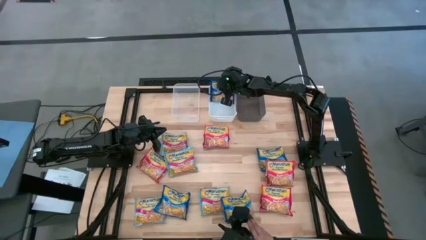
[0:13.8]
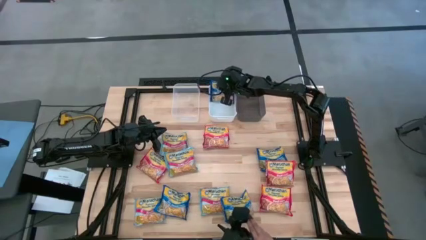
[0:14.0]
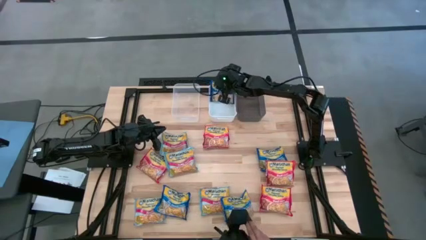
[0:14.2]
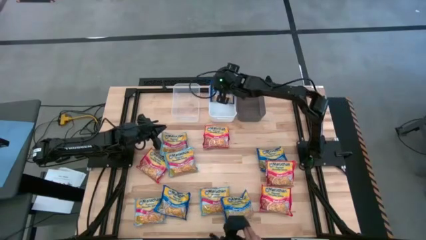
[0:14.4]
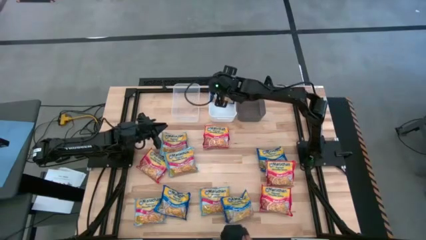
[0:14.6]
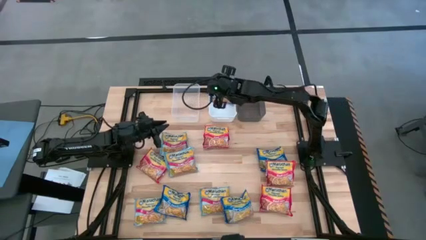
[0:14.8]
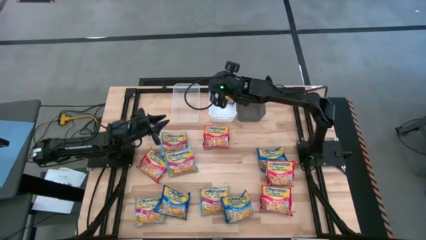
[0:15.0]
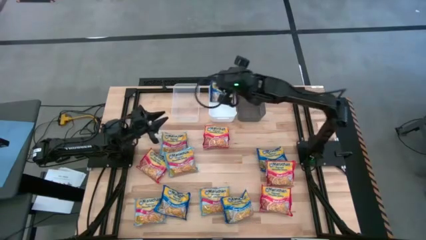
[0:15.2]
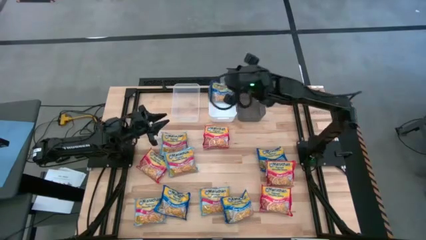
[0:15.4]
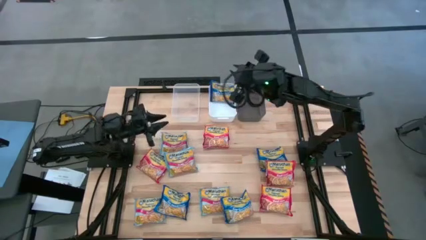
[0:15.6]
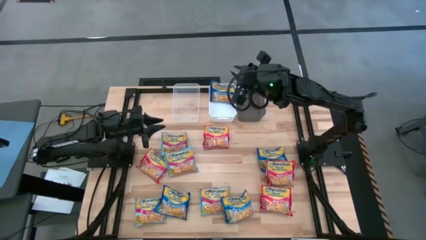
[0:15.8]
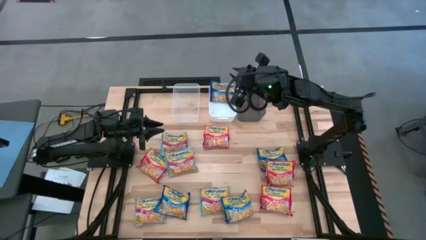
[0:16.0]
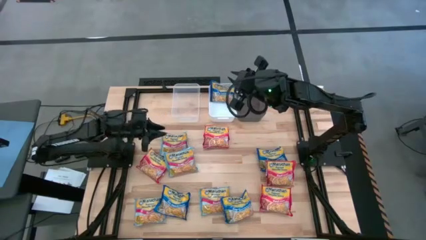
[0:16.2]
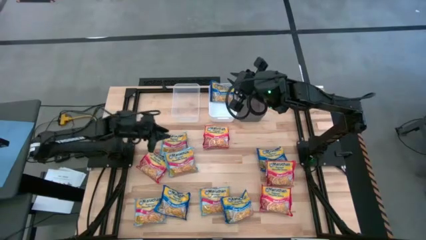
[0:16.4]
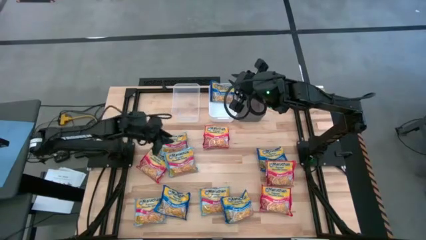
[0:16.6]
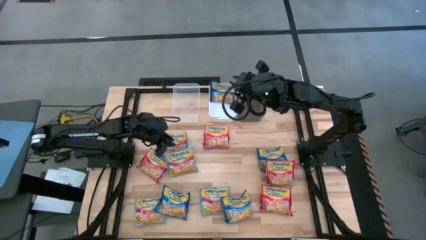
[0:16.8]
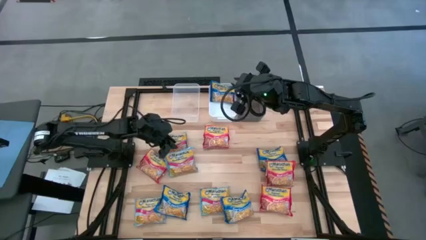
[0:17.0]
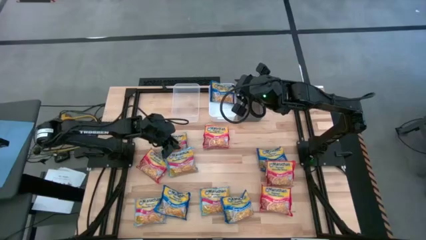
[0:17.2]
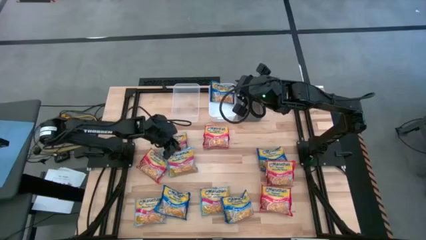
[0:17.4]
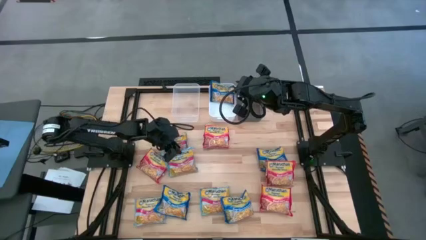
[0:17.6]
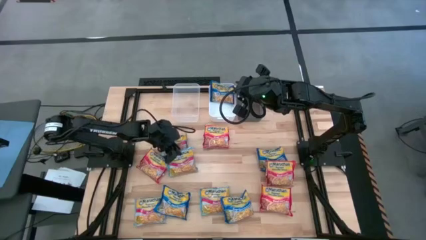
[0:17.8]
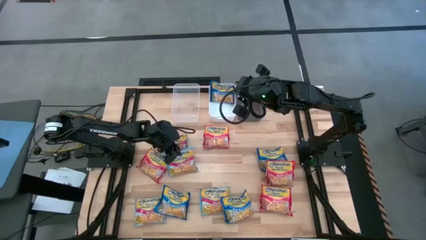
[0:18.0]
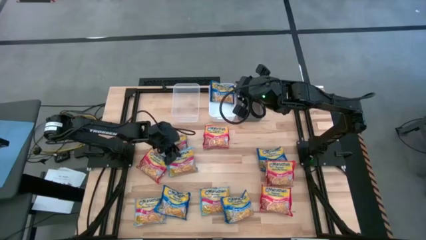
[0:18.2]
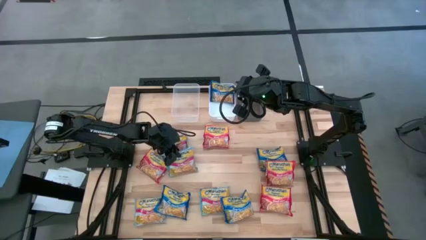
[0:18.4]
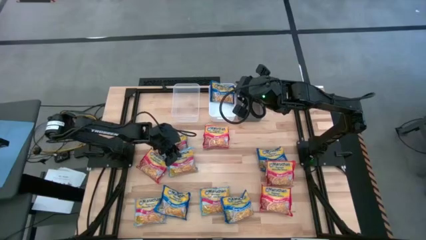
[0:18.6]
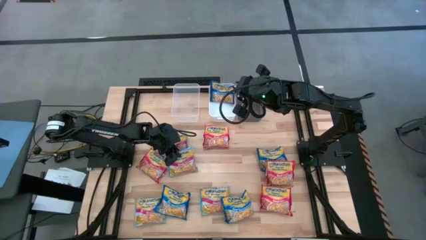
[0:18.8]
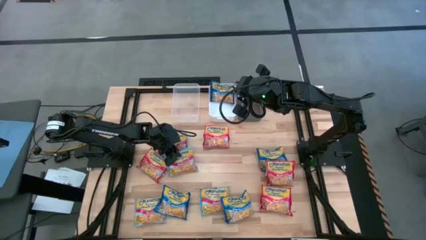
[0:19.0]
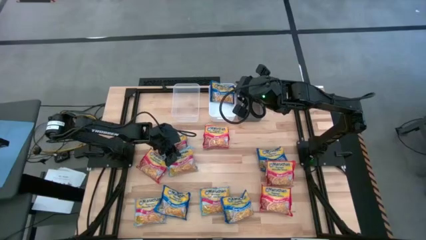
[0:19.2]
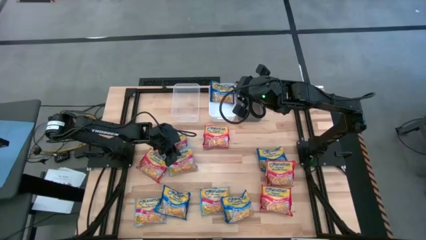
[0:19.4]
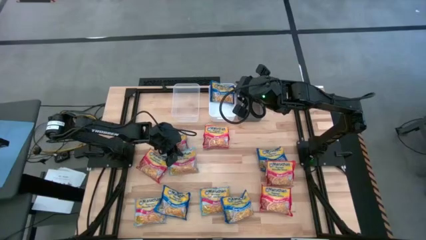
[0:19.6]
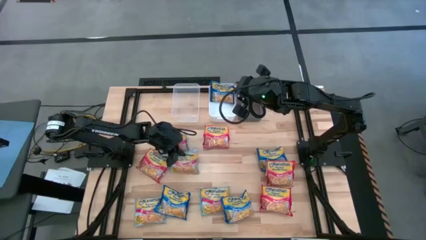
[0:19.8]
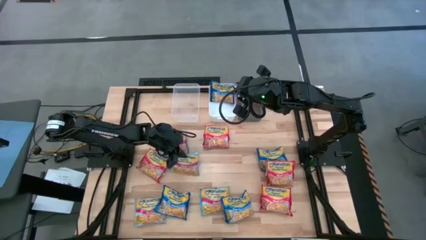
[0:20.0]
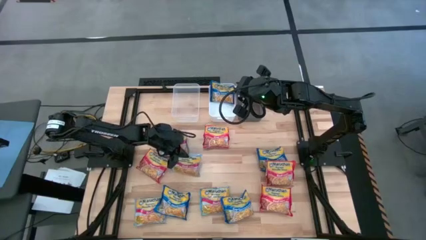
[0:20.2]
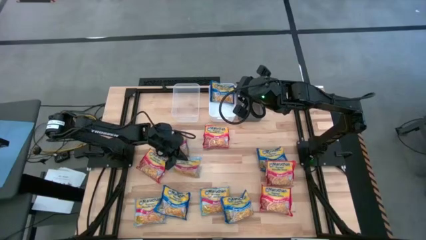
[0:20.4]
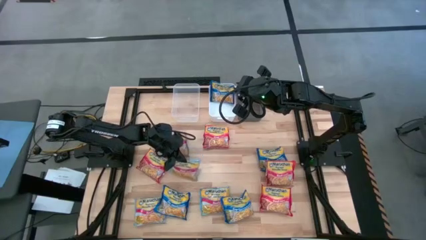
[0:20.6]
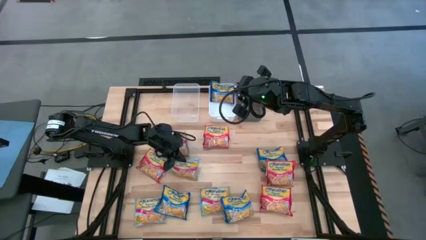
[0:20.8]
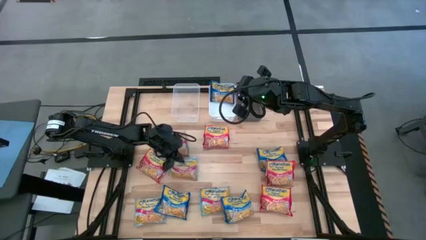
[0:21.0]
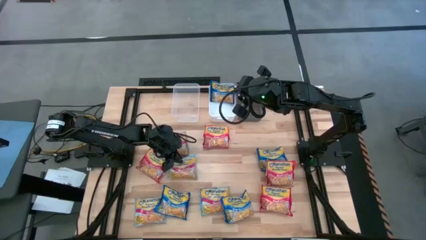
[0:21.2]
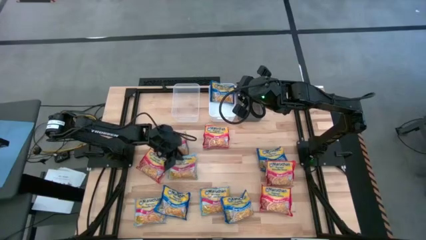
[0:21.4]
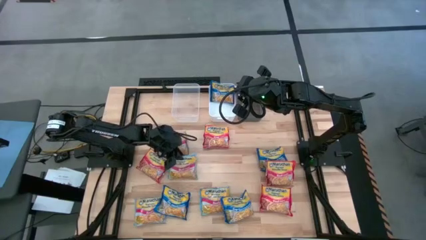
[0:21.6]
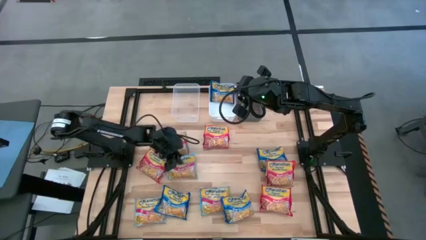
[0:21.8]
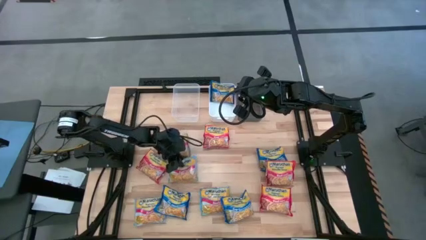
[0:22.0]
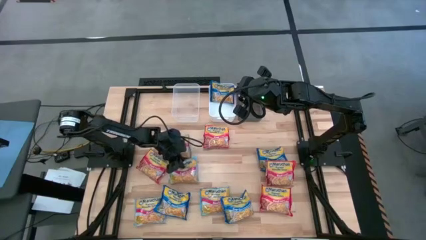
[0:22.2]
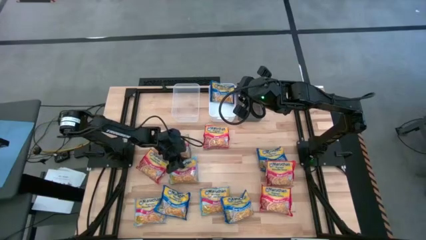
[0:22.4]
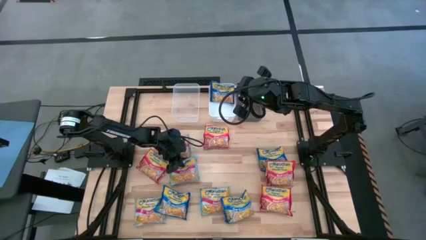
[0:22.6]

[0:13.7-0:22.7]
Task: Sort Maruchan noodles
Put the light blue noodle pack into the transparent black bin

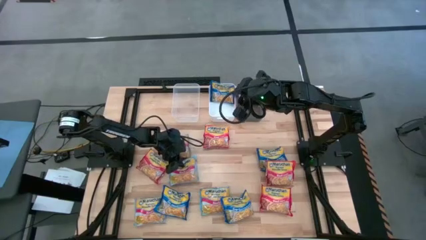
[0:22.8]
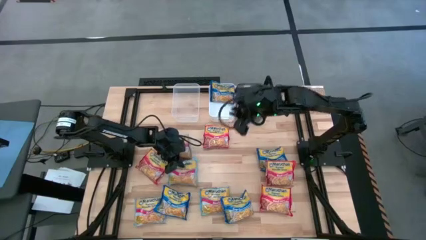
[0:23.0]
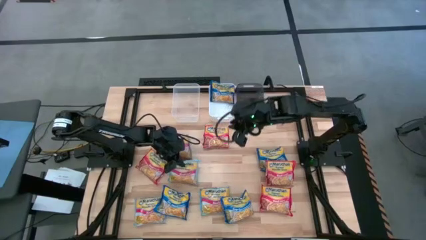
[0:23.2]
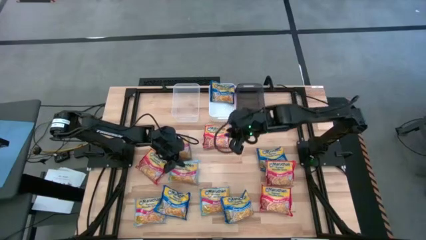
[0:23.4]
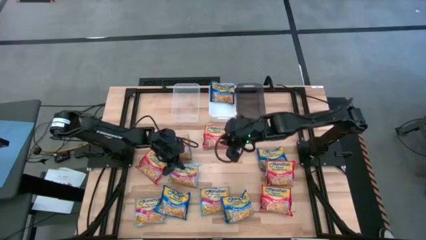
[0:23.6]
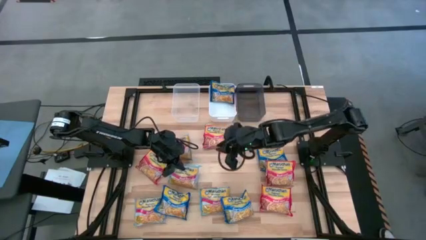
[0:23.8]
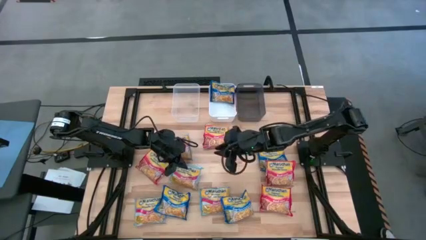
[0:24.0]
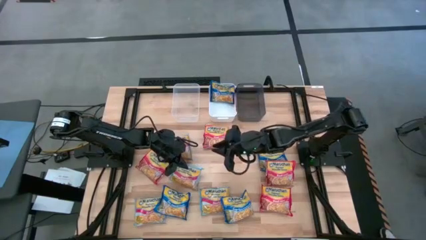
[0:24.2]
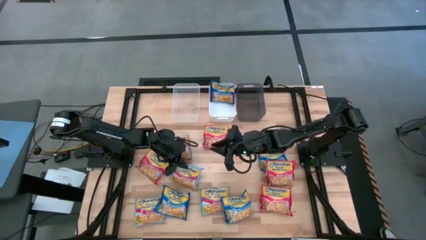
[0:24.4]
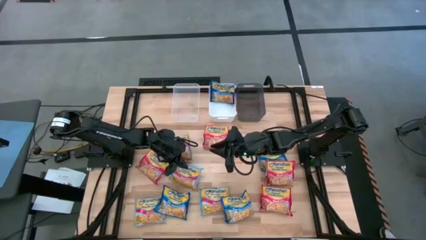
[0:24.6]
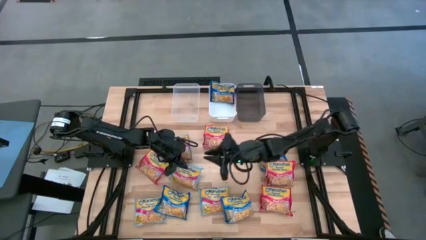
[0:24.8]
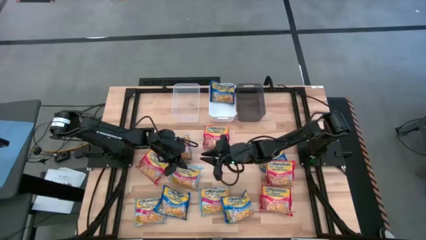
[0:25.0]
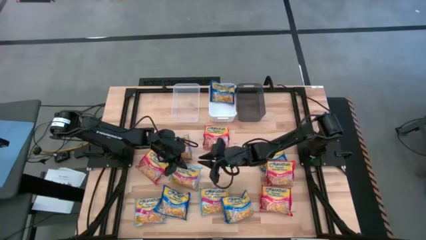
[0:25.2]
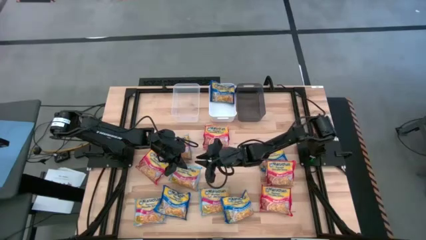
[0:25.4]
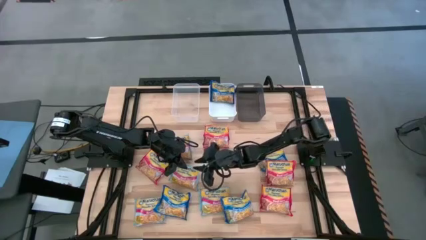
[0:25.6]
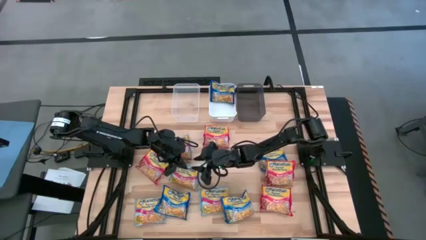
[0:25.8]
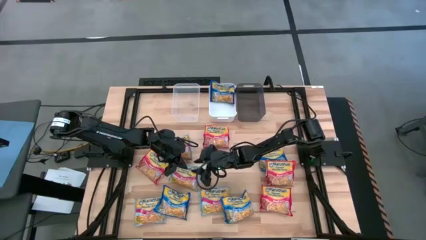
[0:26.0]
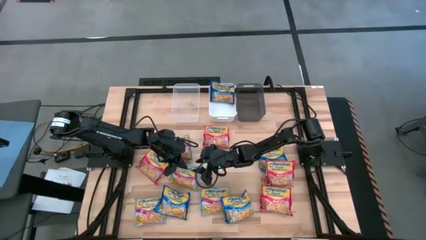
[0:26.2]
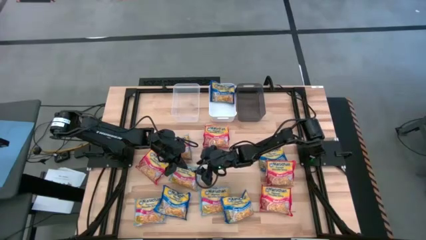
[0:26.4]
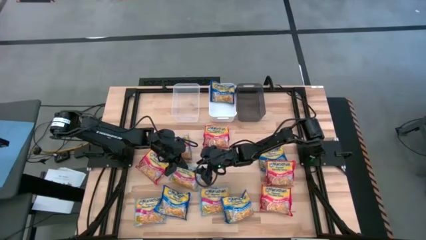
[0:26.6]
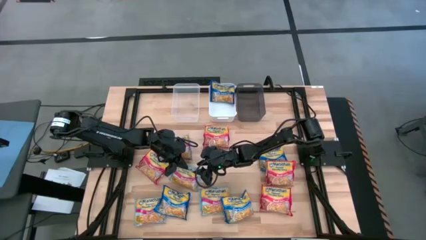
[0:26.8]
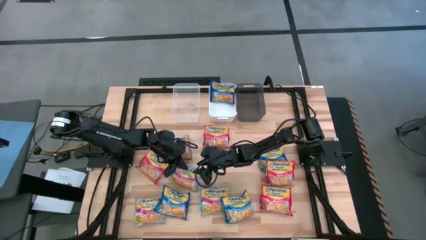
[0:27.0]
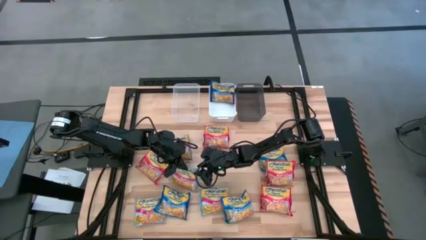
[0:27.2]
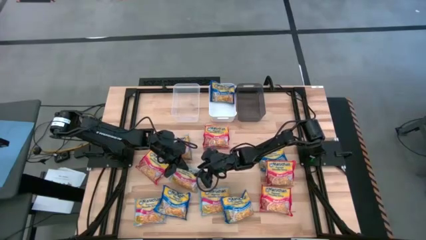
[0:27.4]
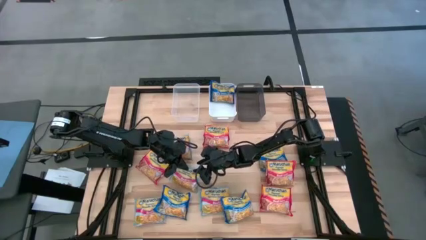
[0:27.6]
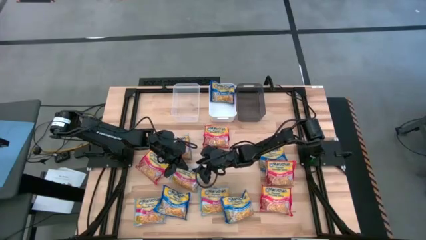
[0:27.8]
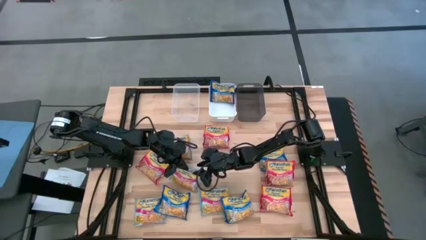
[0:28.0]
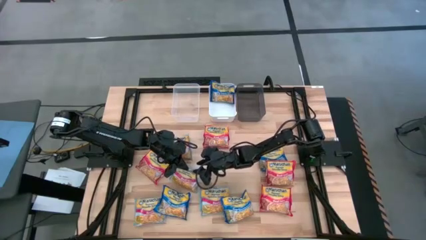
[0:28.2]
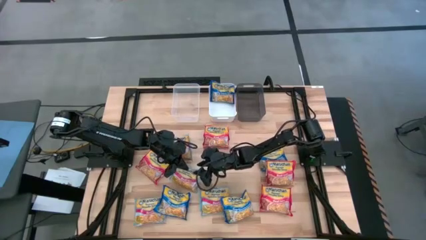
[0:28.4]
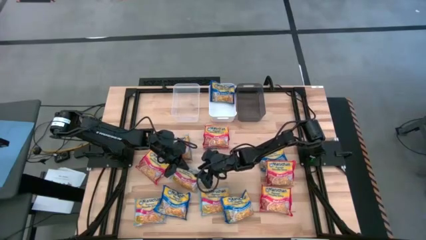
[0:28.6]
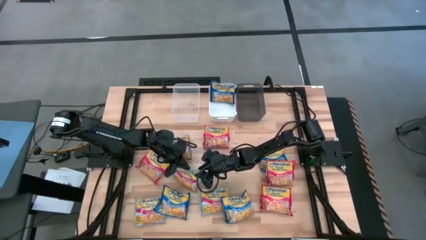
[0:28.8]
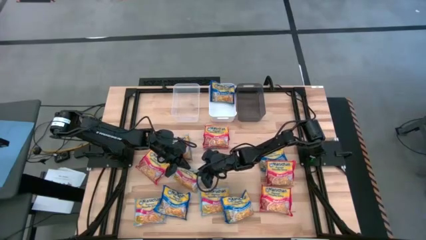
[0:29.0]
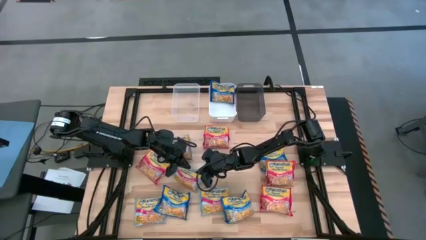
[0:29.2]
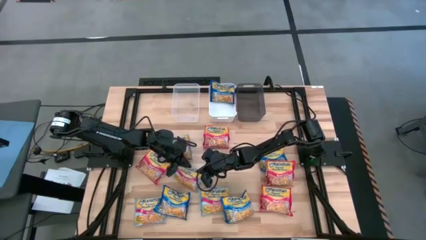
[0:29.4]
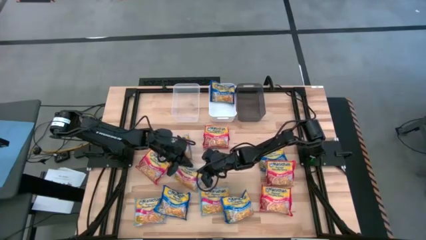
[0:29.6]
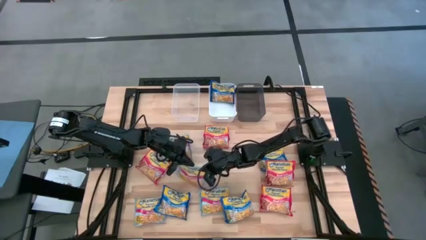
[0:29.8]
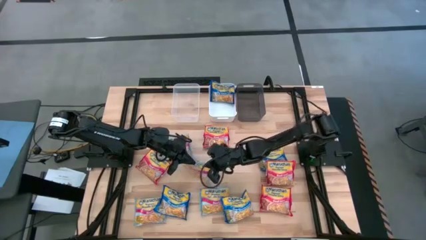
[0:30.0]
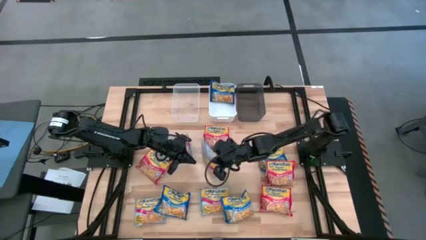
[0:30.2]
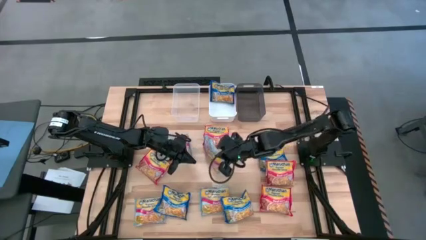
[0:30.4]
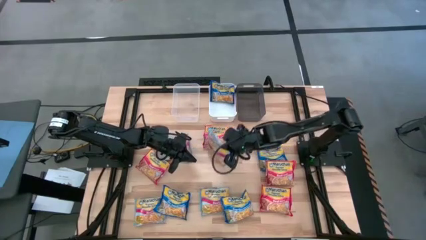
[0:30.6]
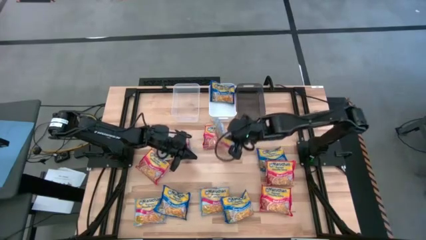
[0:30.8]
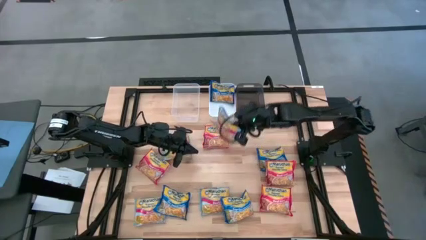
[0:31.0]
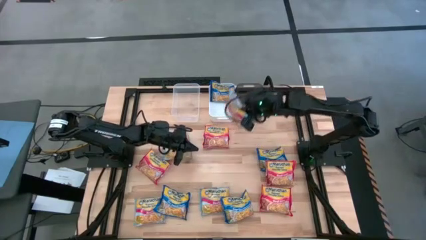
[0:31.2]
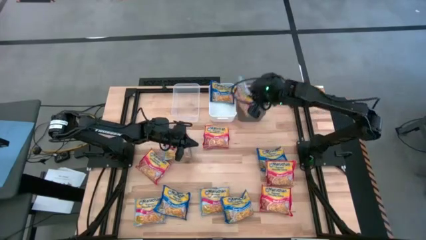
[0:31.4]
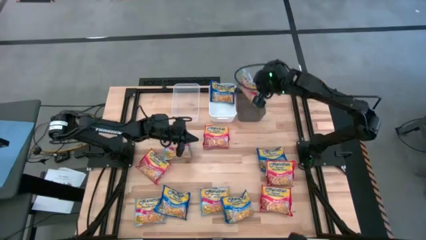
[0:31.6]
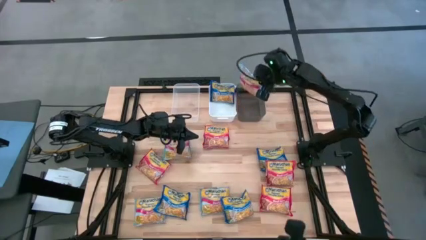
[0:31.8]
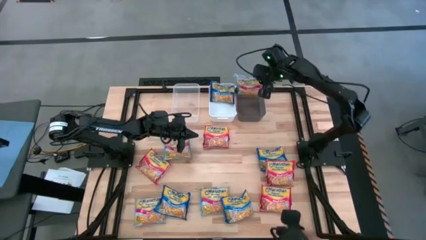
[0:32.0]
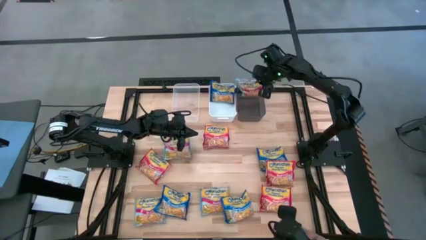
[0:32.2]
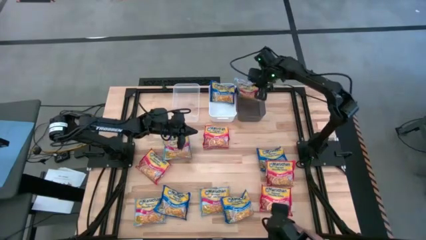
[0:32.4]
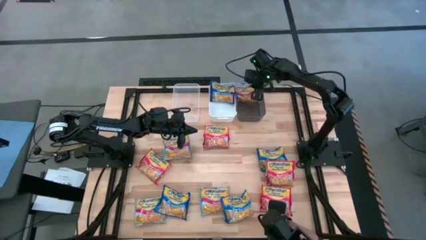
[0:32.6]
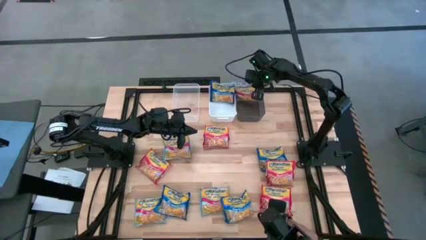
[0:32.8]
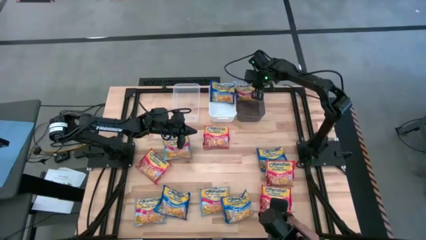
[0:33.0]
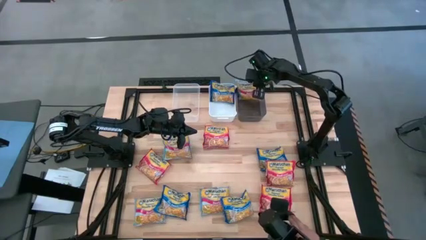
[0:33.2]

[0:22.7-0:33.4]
Put the light blue noodle pack into the black bin
